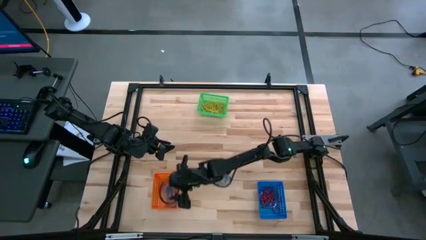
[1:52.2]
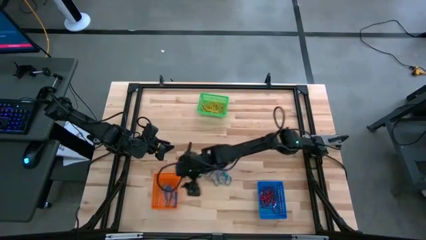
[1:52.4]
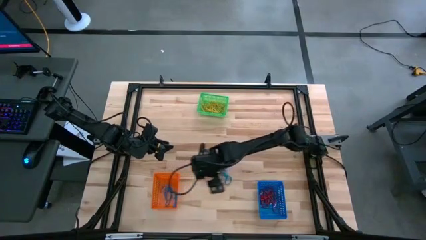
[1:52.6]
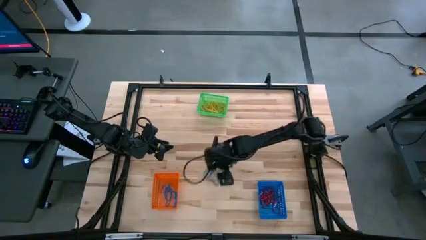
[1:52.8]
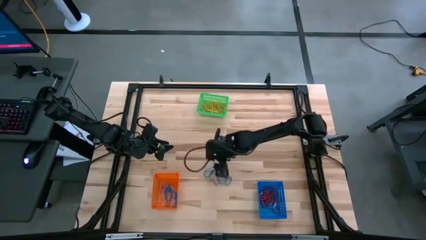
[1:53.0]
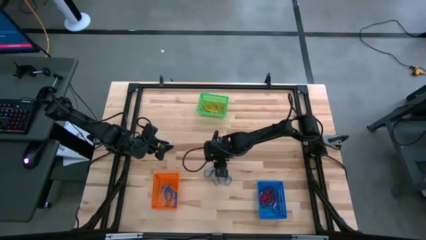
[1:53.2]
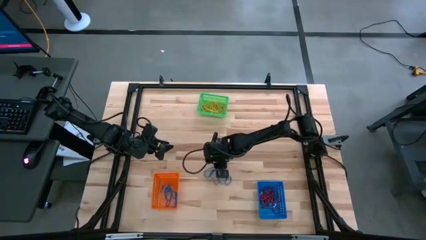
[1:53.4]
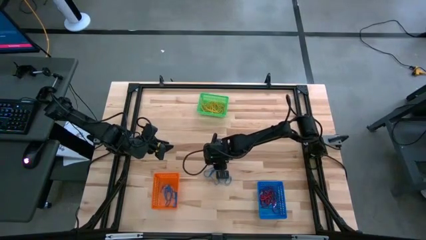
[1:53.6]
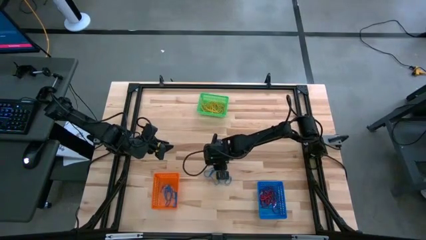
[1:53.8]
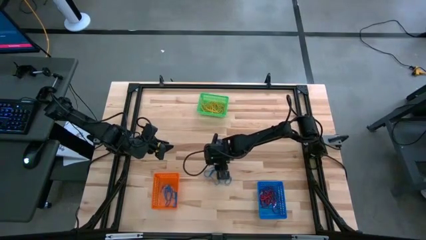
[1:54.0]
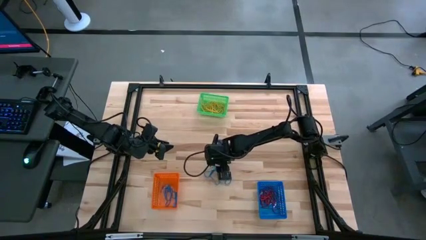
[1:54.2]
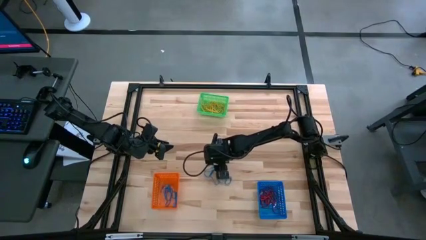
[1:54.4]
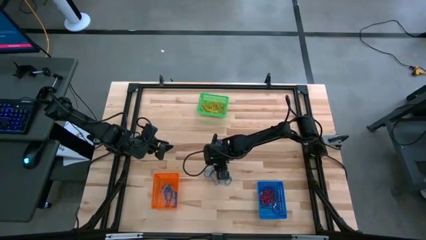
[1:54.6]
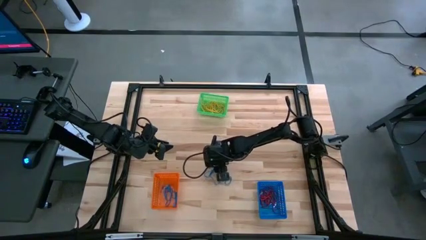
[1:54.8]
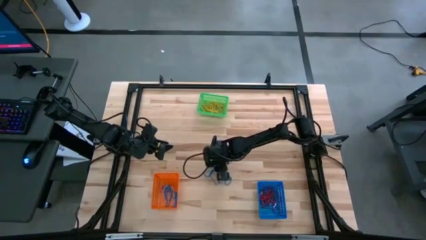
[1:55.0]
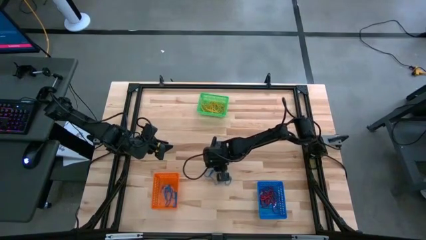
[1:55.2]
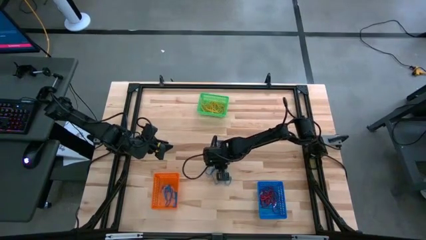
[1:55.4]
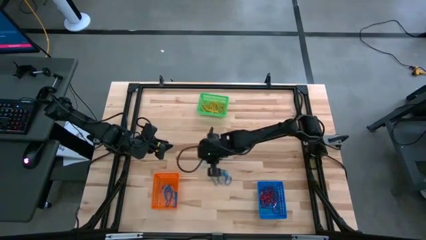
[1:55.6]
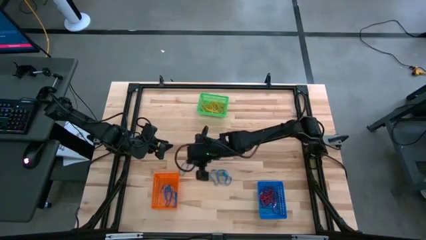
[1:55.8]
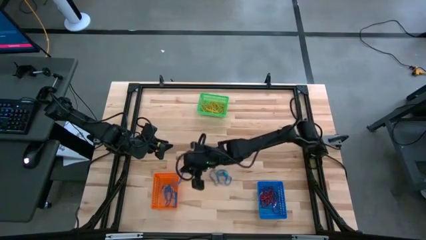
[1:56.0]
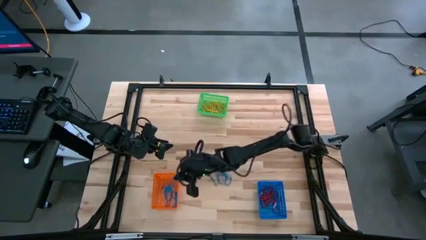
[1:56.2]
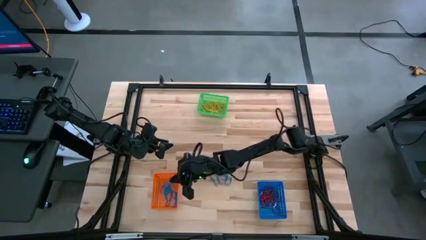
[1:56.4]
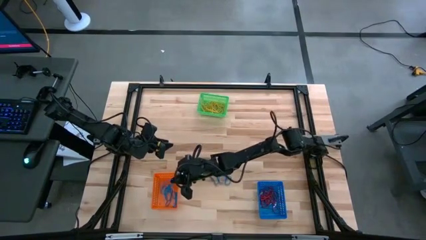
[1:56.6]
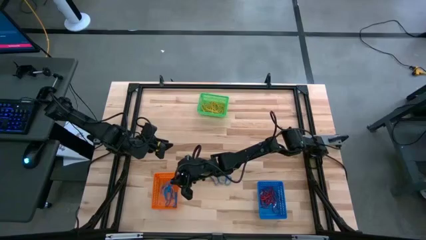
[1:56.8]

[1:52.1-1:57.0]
Task: Sort rubber bands into baskets
Put the blue rubber band into the orange bin

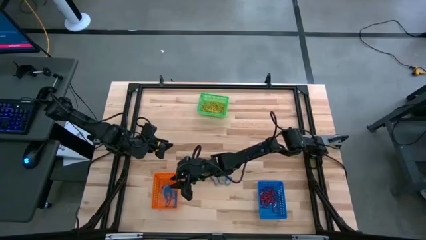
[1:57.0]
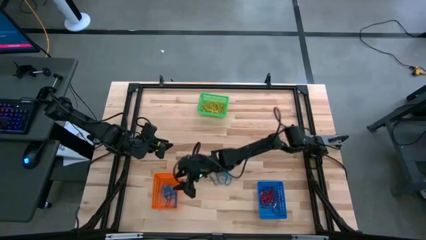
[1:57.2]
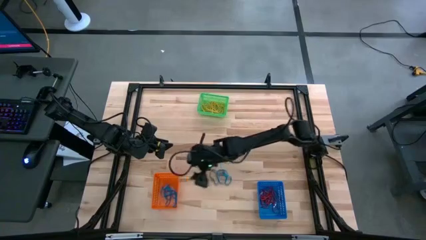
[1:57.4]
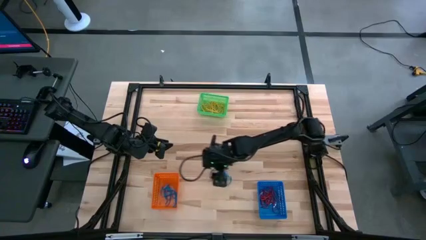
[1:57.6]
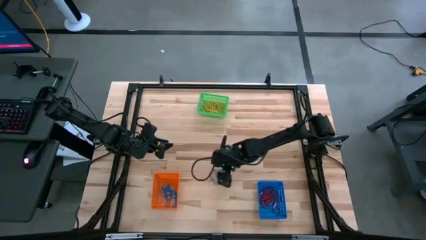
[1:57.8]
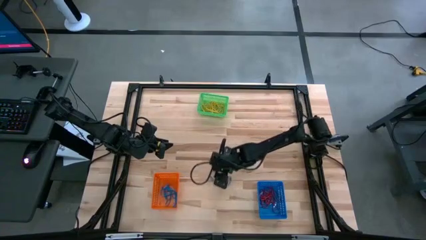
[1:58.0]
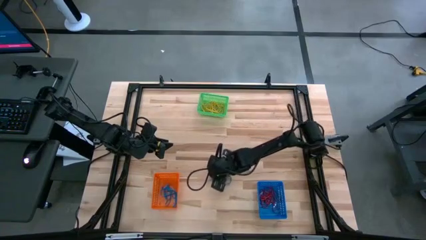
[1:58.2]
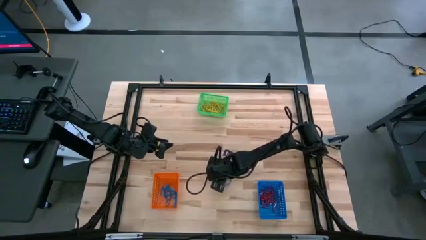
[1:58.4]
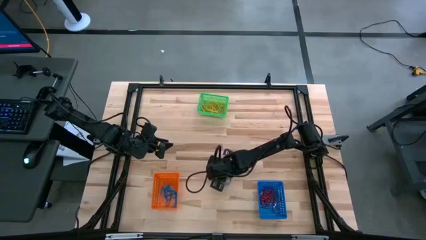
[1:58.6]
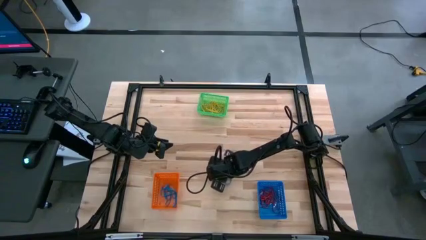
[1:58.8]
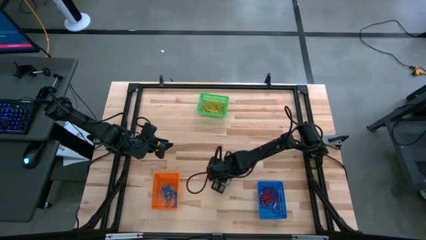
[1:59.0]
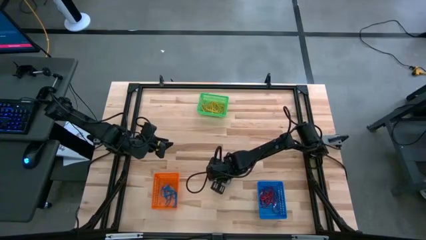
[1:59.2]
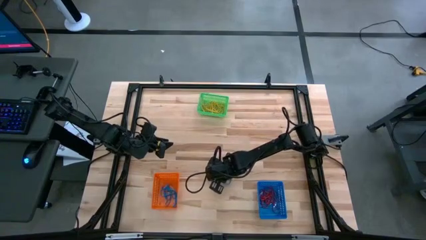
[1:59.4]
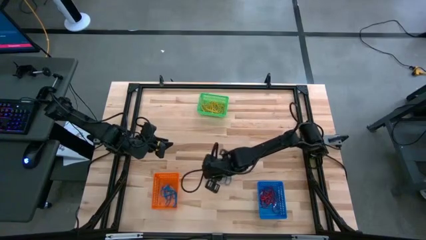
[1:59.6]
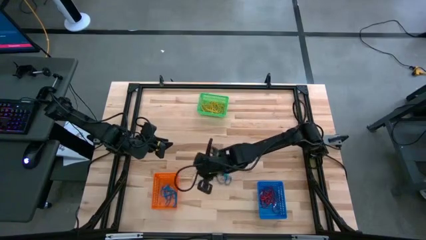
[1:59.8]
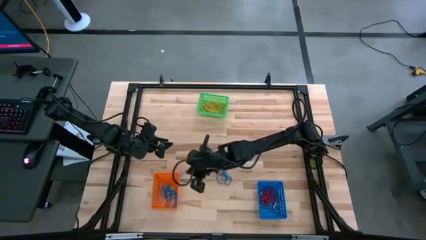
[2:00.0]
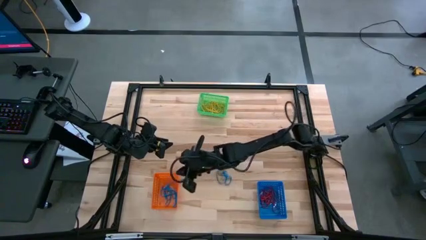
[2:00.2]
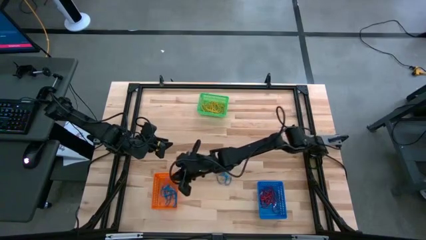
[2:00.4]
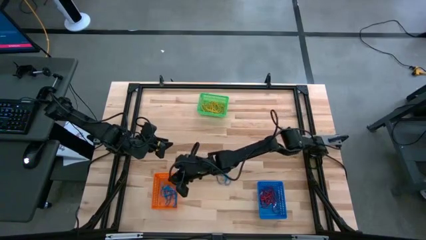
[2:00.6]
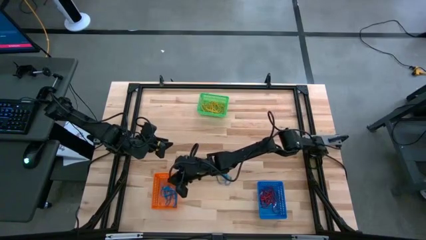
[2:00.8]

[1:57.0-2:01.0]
Put the blue rubber band into the orange bin

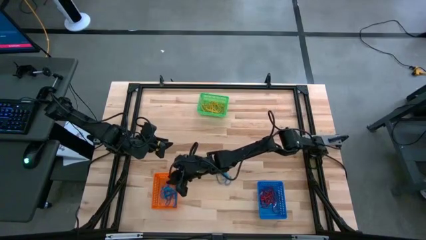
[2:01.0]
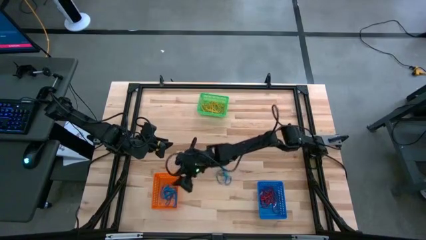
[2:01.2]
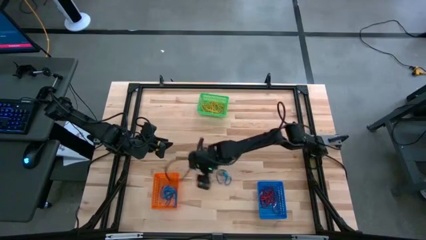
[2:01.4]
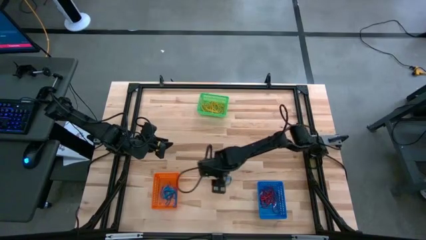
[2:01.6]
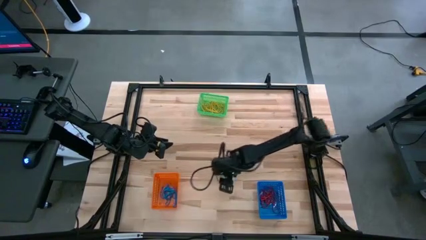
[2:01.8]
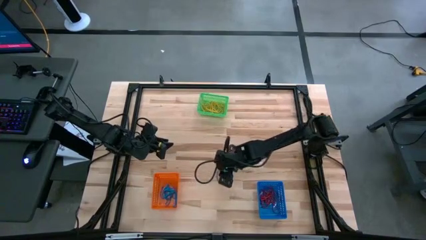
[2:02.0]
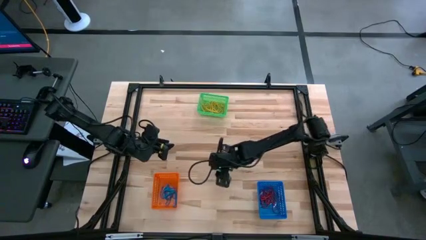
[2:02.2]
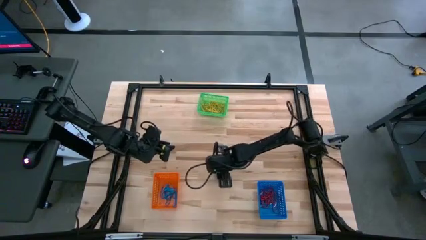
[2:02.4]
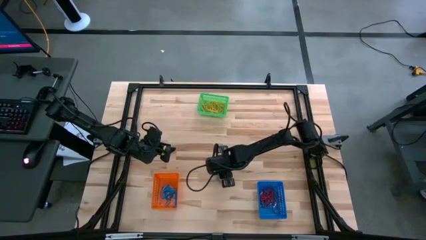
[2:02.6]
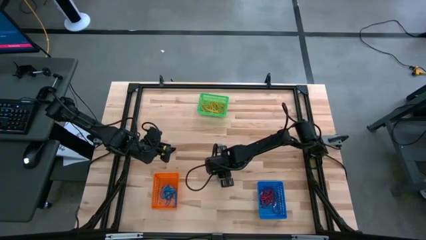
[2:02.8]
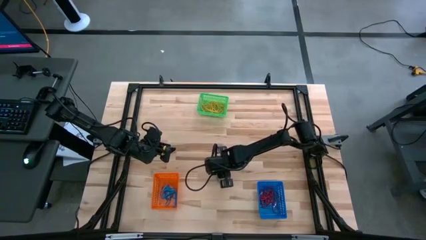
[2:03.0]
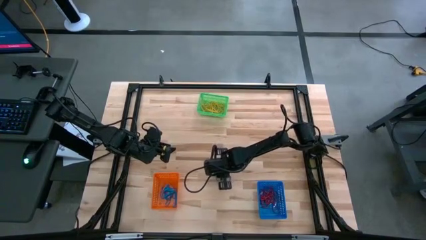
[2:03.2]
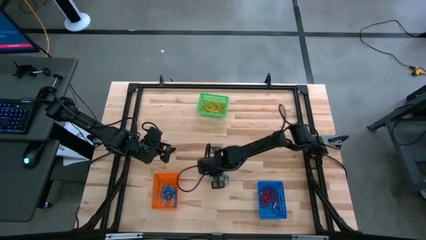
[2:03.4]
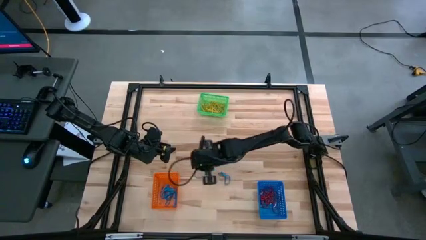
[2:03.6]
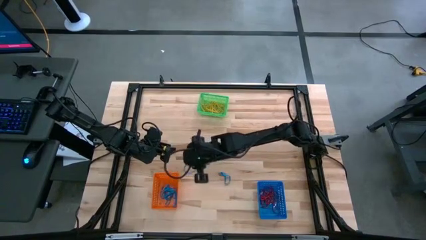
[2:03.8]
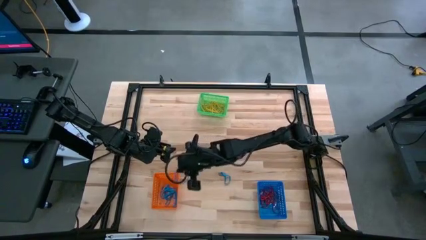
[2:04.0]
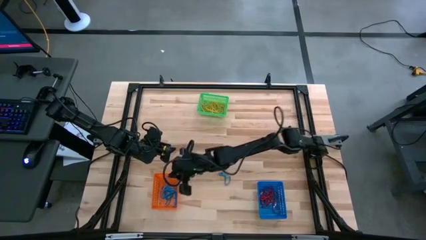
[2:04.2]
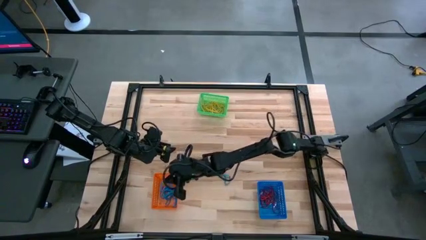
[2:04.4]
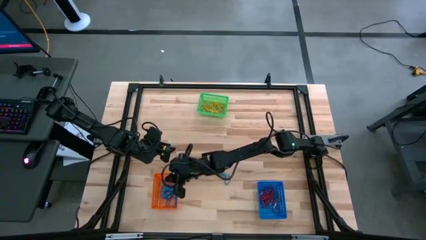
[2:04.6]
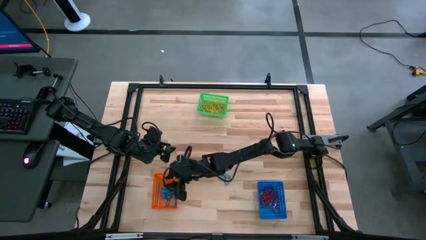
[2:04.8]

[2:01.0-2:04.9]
Put the blue rubber band into the orange bin

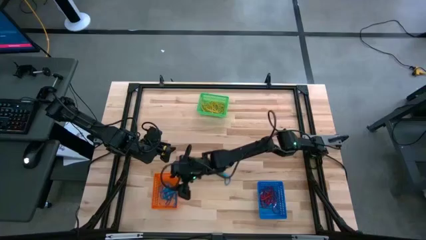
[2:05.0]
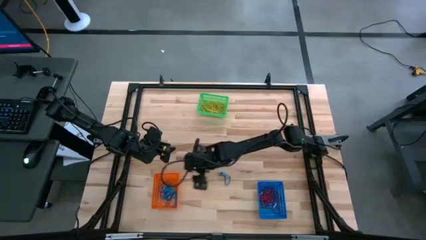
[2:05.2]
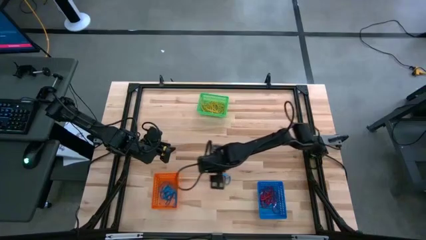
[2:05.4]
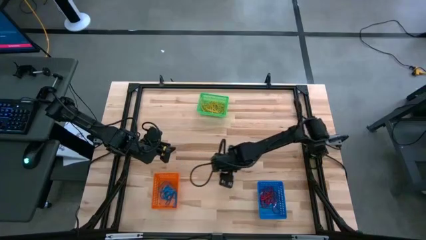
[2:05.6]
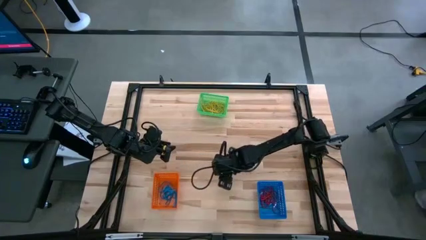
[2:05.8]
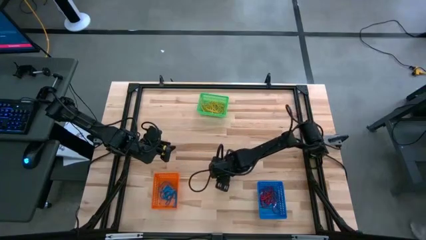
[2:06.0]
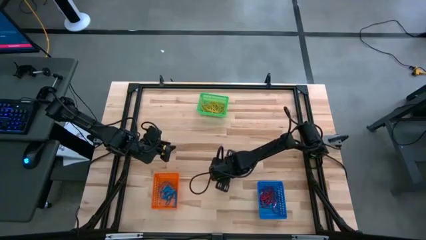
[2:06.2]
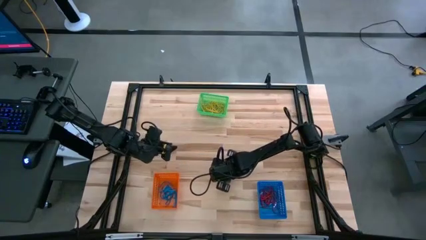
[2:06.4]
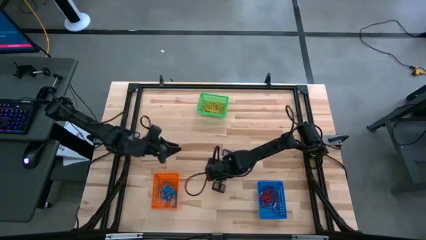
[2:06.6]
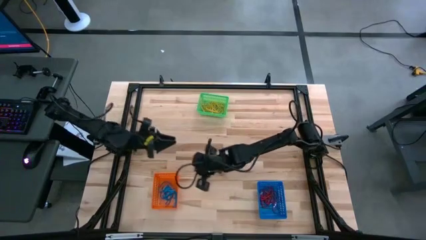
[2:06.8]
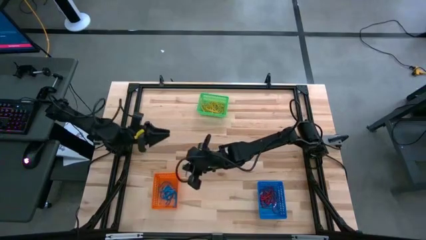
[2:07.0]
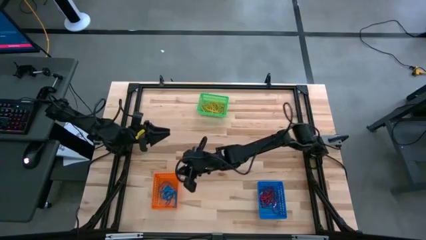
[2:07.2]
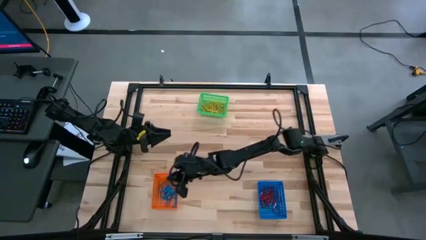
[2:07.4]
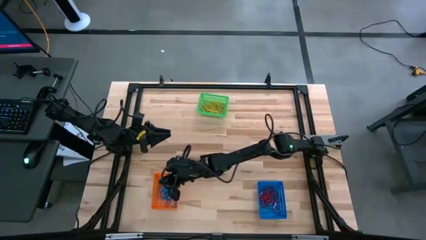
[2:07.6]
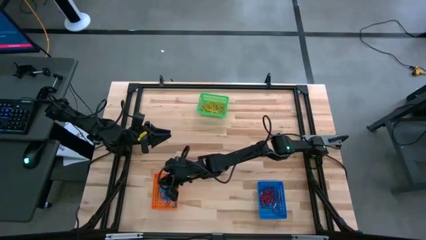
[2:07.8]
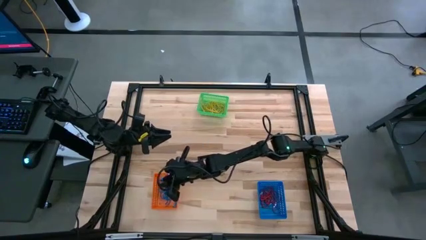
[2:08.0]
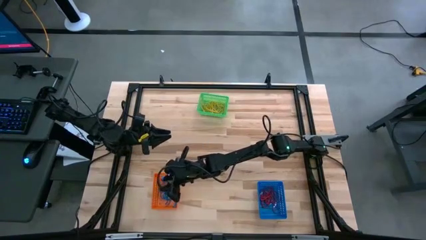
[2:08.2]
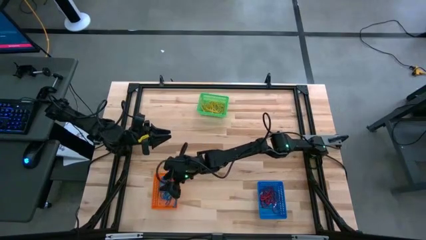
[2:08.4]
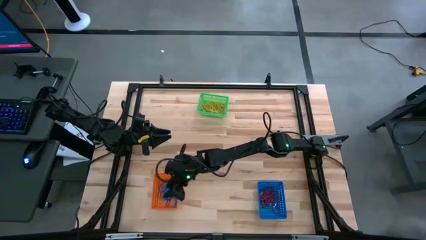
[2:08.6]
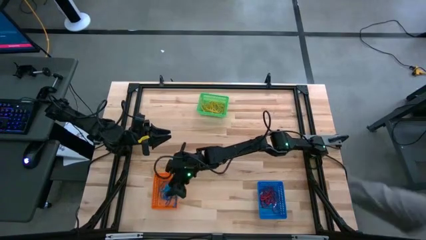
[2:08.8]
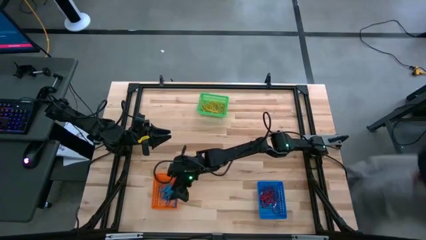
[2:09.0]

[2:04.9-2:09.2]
Put the blue rubber band into the orange bin
